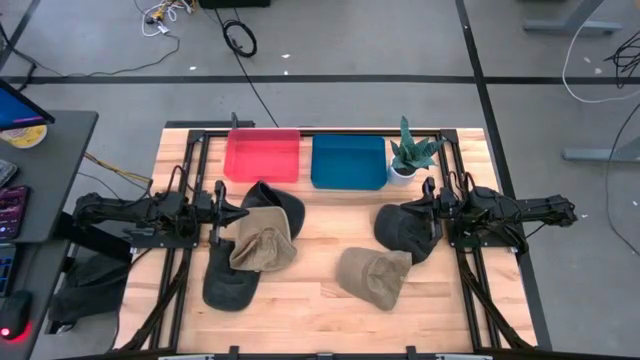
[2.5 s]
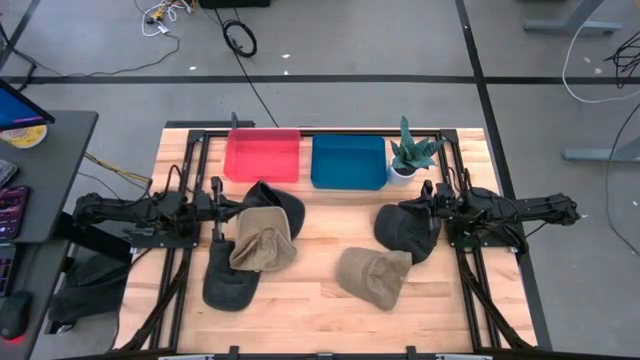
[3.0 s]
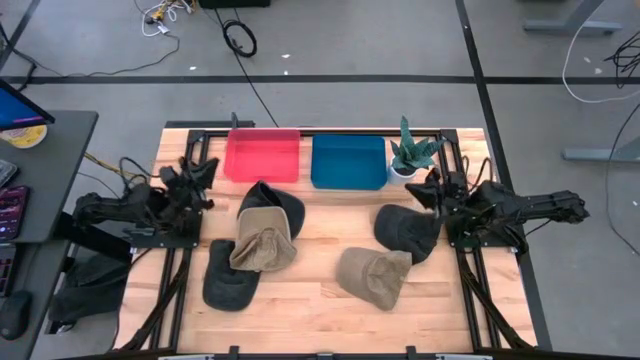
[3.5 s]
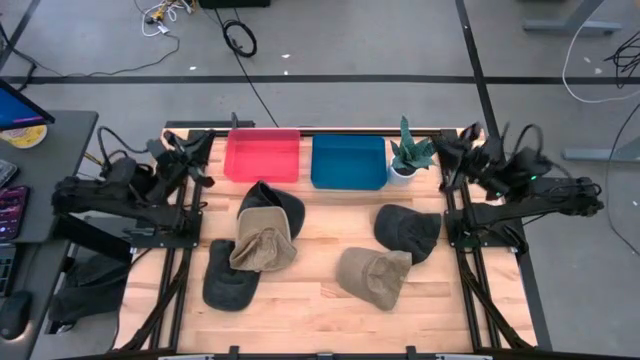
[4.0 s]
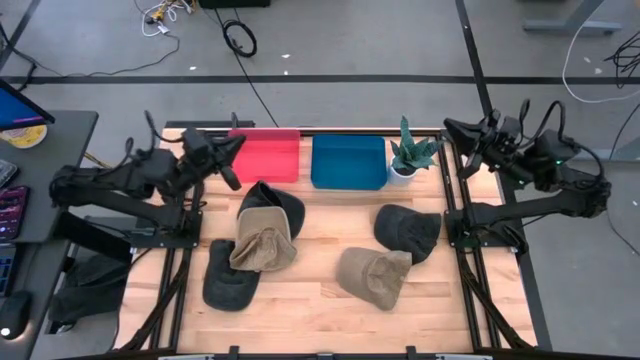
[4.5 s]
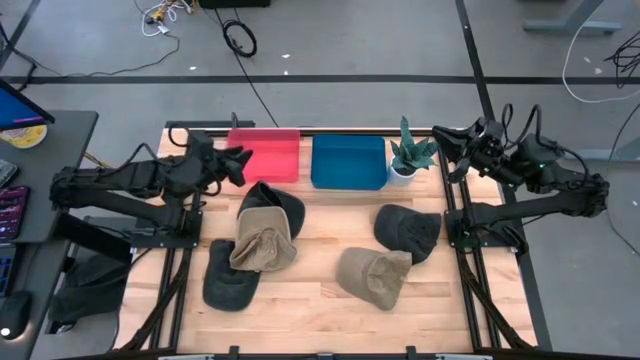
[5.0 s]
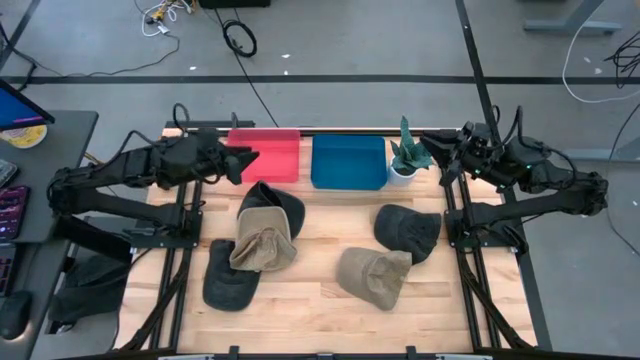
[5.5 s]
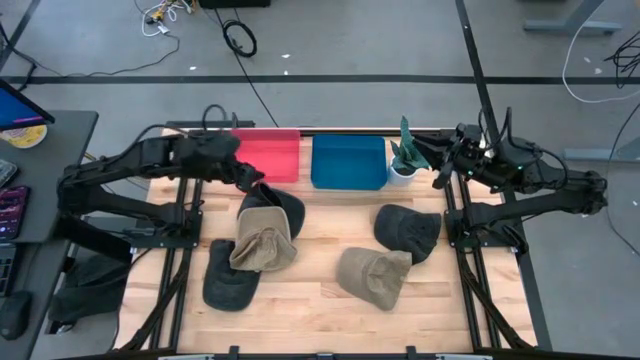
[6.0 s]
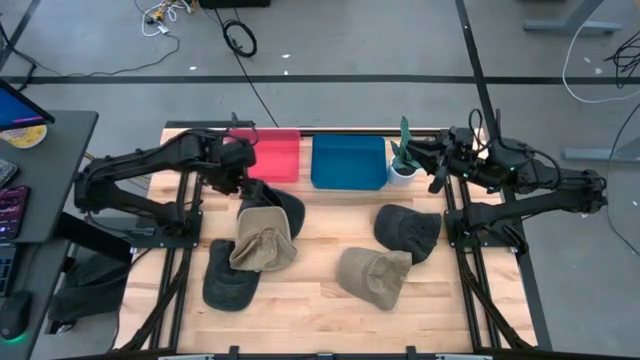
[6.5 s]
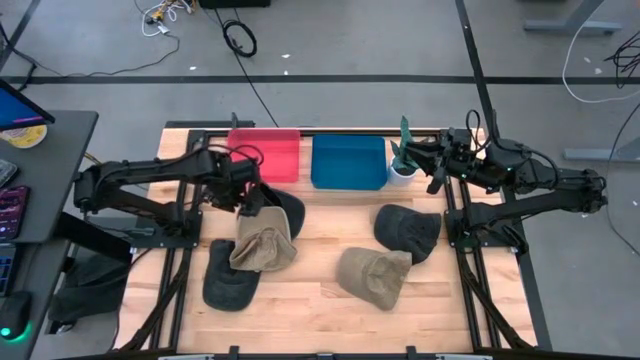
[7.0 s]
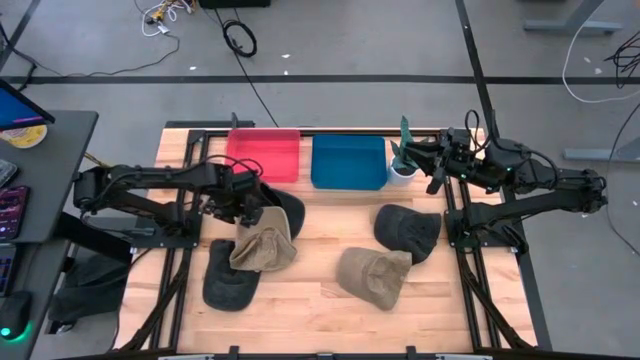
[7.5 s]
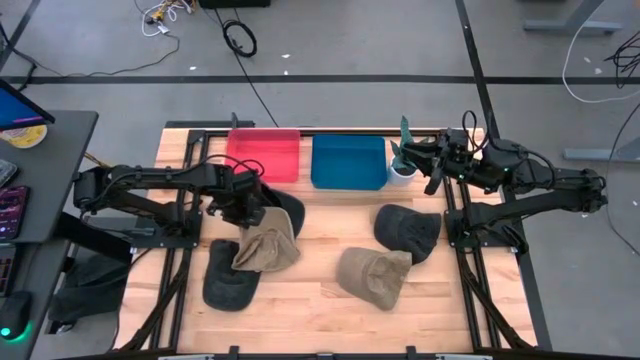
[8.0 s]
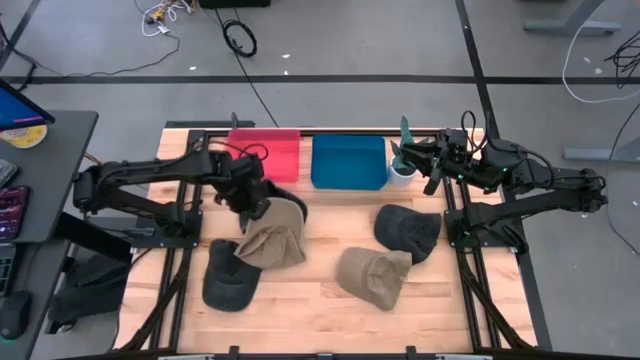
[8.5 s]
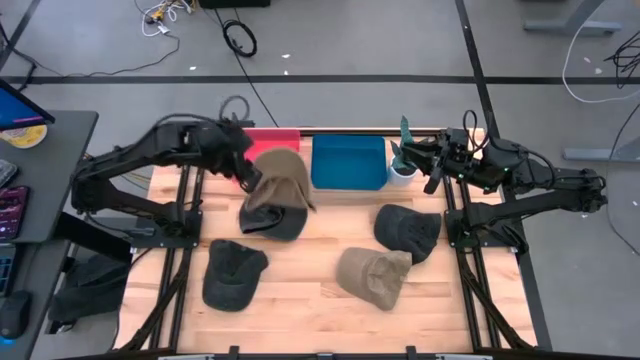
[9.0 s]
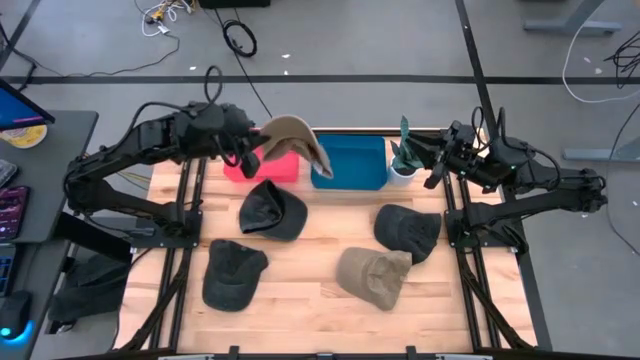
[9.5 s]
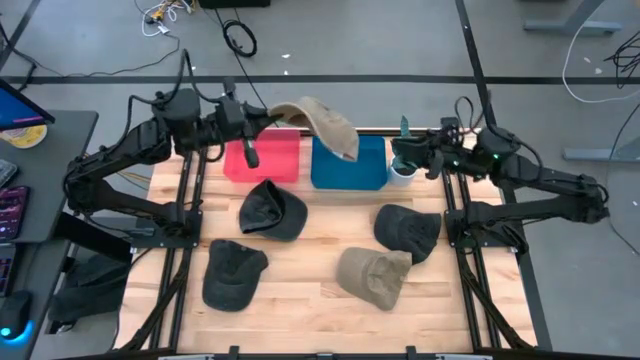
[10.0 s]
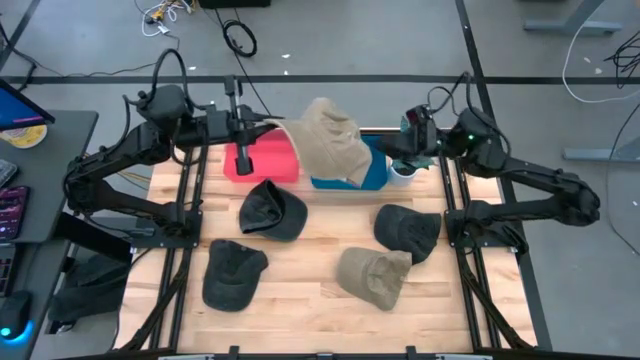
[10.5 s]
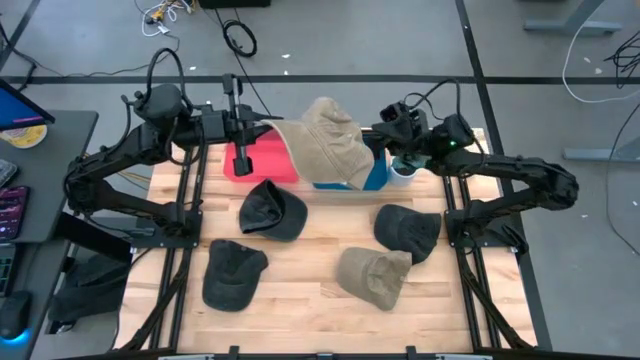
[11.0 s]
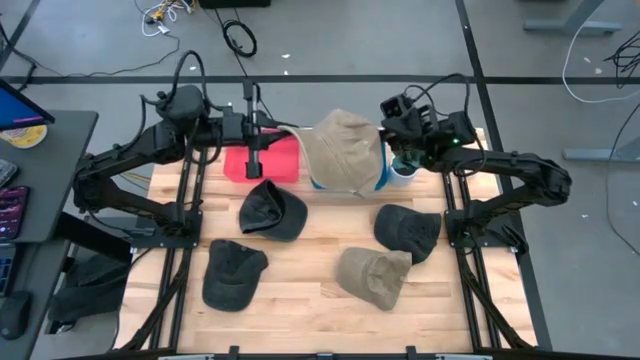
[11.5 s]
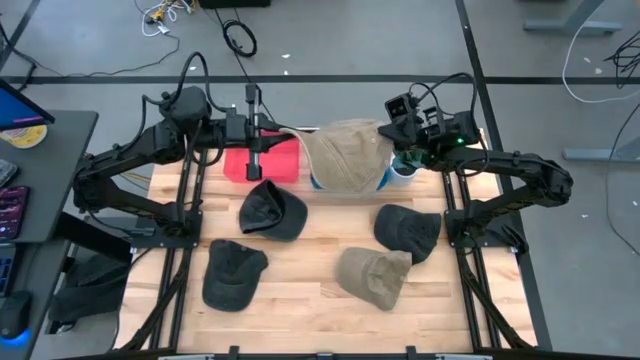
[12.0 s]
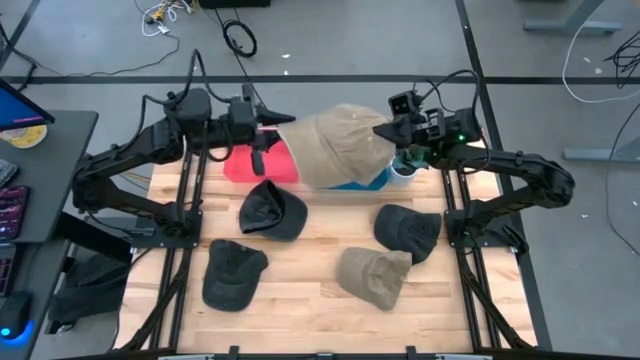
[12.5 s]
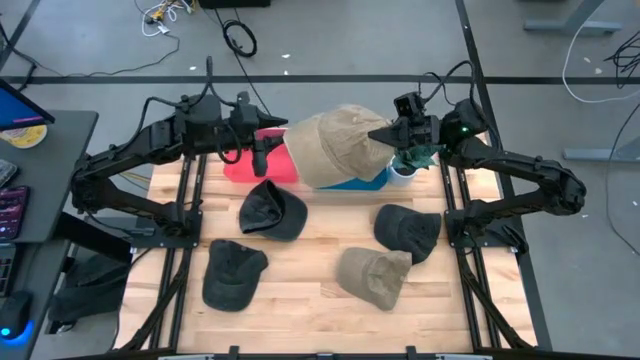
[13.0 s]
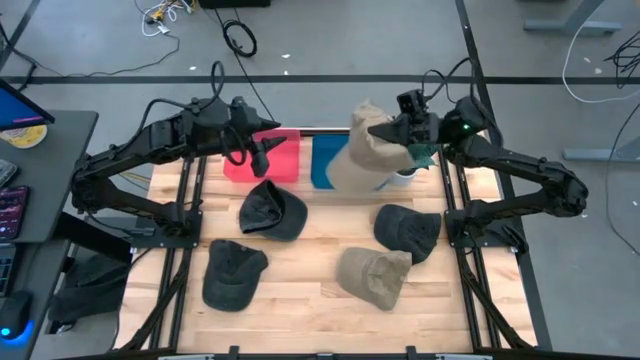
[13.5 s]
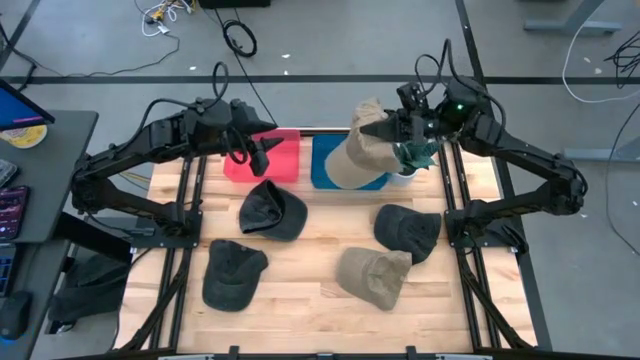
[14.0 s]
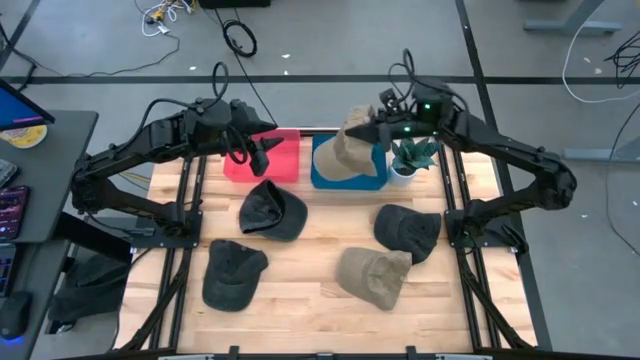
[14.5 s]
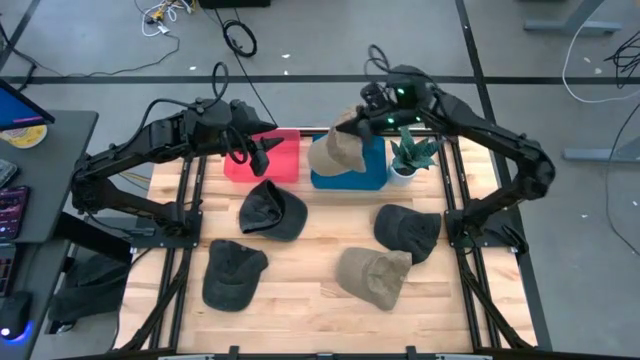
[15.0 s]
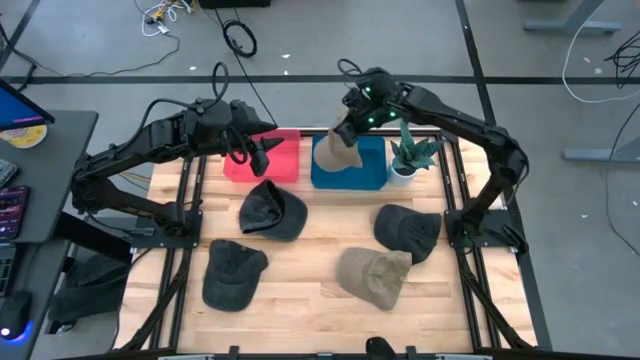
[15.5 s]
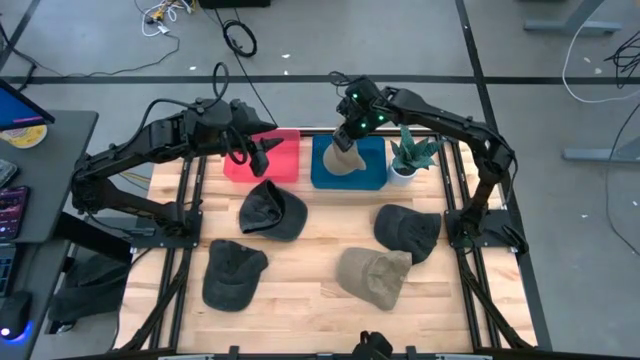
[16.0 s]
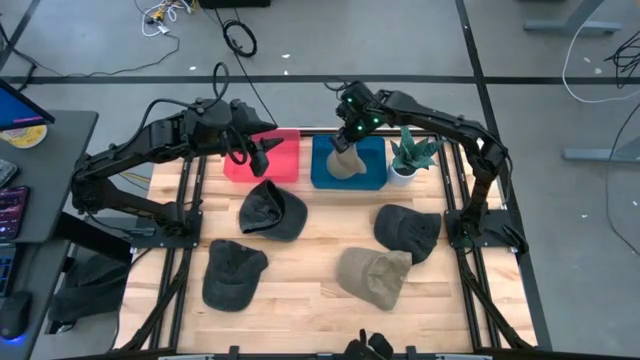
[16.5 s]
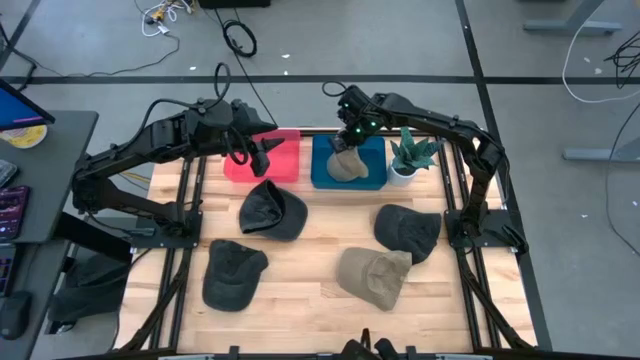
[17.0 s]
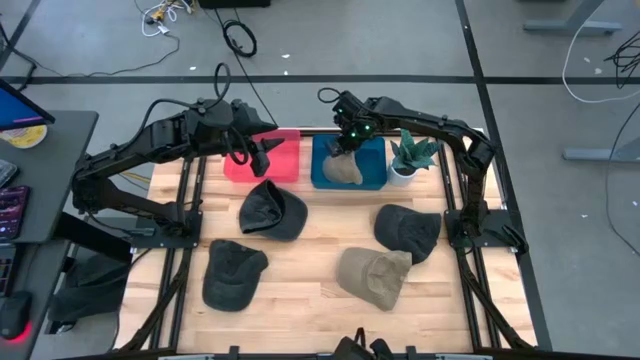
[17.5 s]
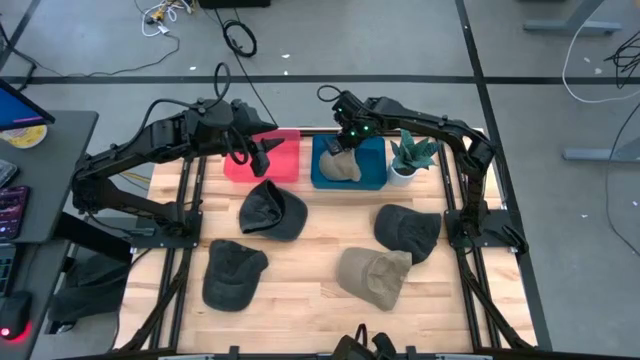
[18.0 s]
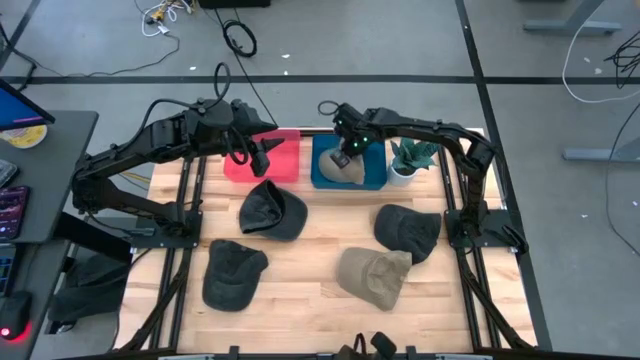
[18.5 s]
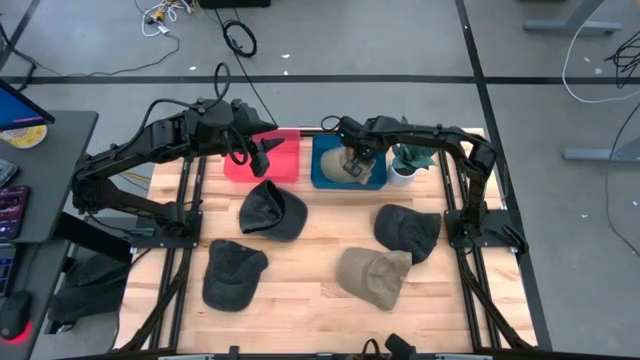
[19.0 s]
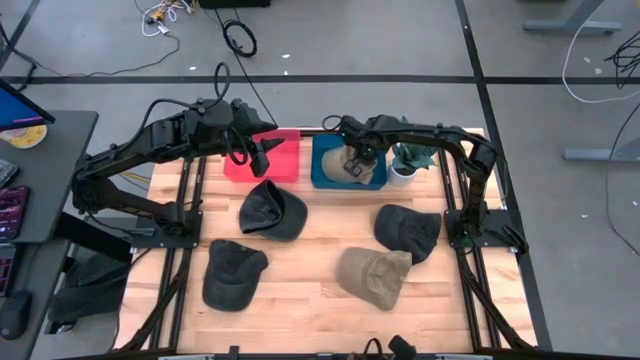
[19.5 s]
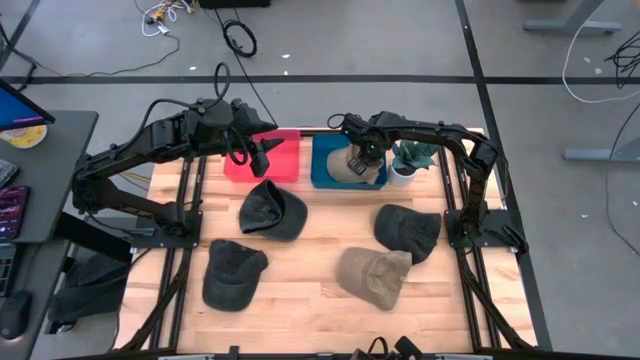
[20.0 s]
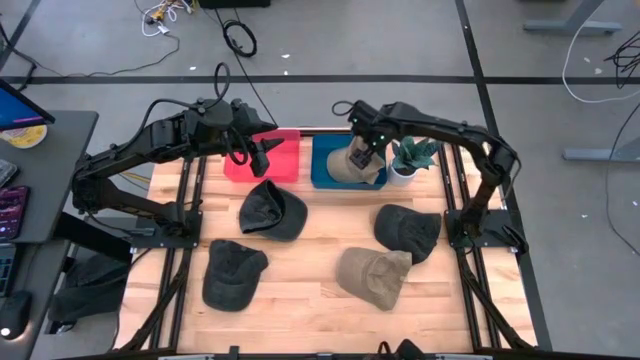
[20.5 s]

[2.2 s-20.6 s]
Task: Pick & Place hat
Put the left light brown cap into the blue bin
